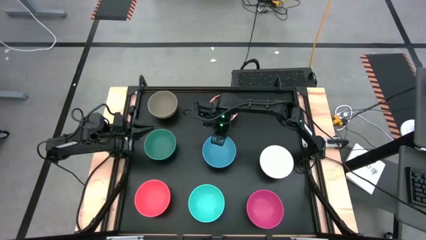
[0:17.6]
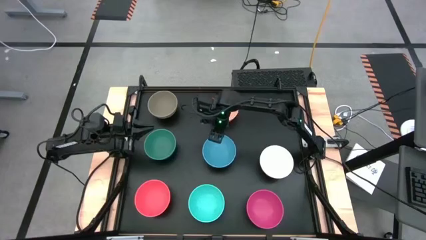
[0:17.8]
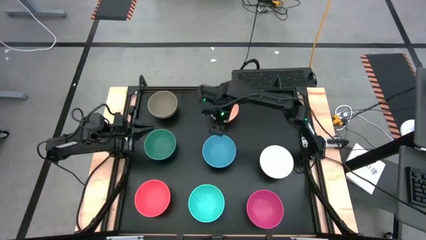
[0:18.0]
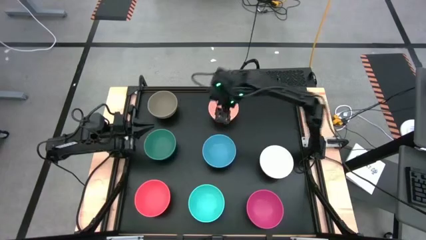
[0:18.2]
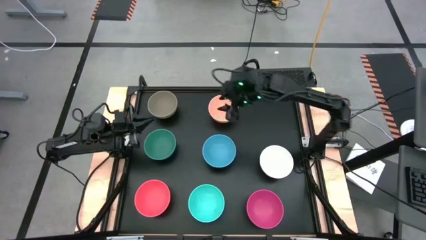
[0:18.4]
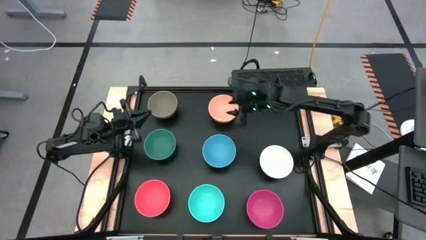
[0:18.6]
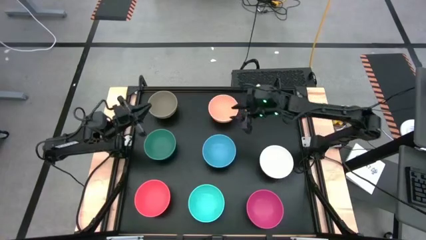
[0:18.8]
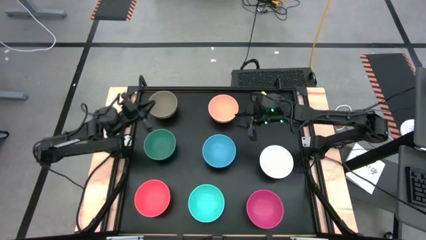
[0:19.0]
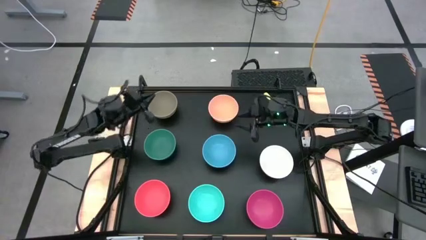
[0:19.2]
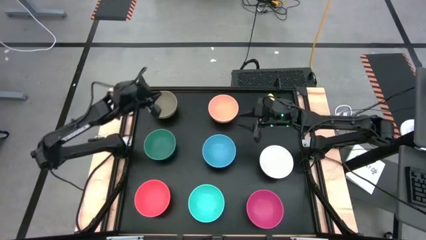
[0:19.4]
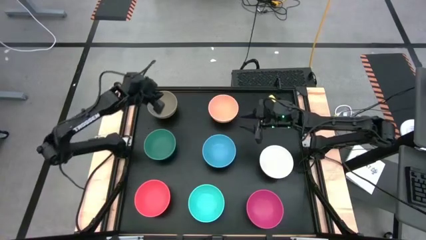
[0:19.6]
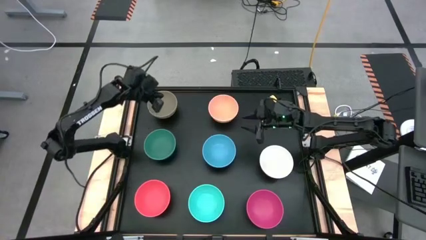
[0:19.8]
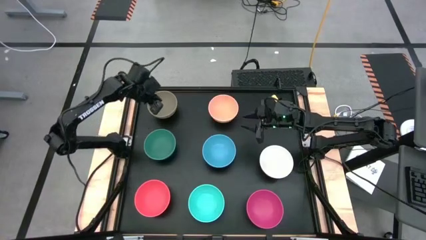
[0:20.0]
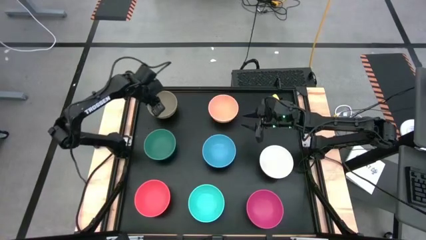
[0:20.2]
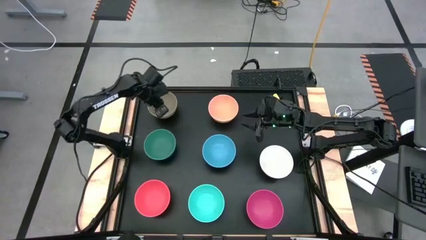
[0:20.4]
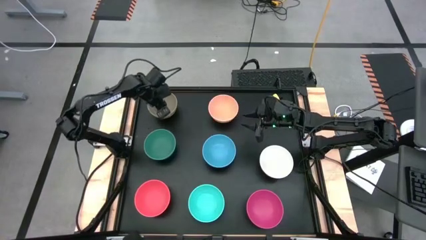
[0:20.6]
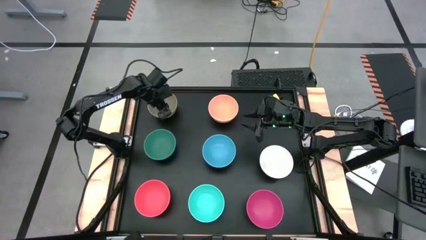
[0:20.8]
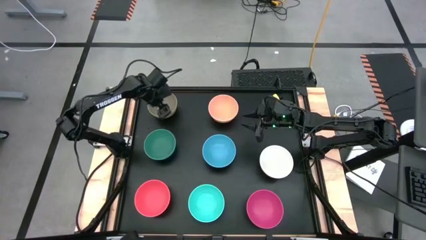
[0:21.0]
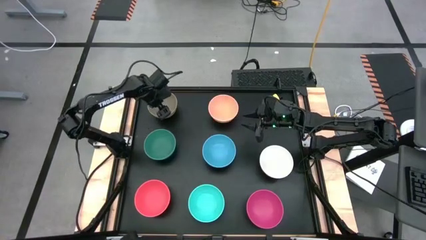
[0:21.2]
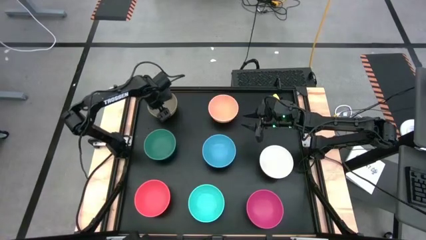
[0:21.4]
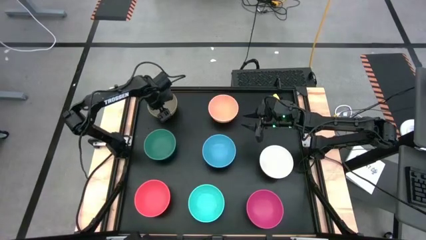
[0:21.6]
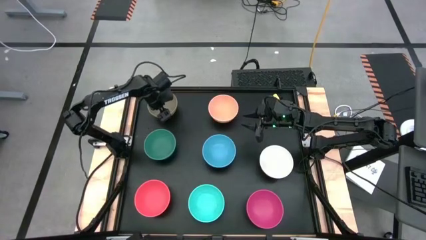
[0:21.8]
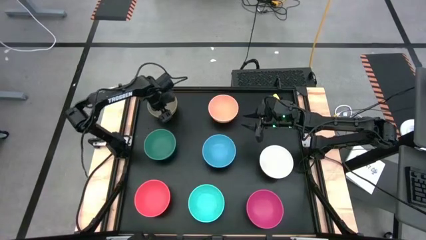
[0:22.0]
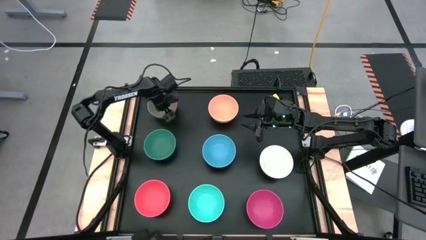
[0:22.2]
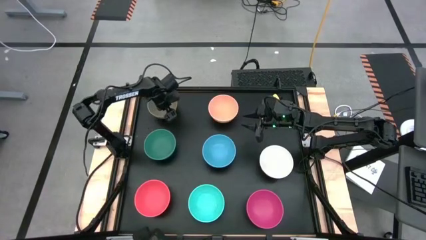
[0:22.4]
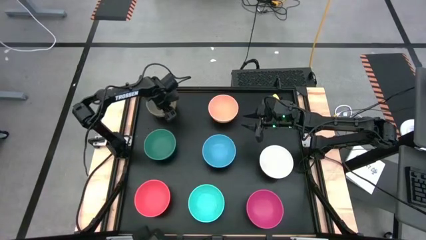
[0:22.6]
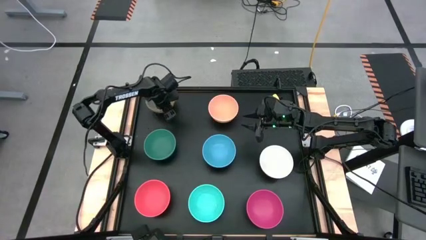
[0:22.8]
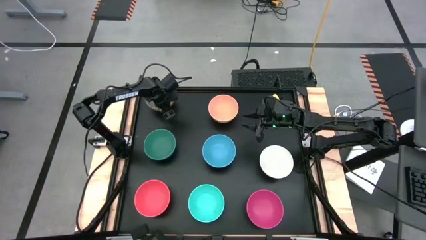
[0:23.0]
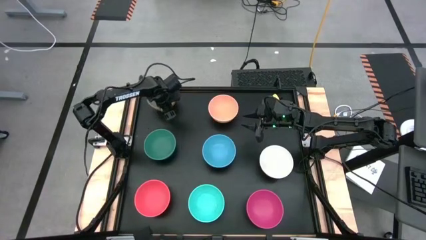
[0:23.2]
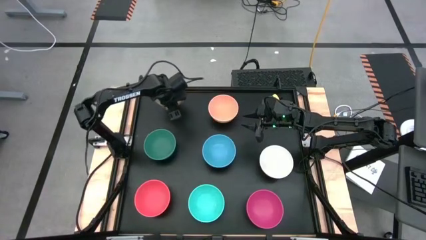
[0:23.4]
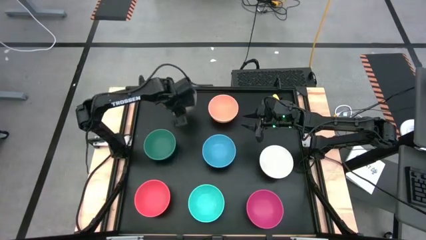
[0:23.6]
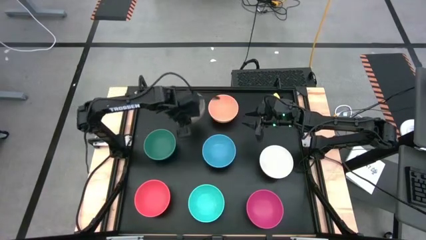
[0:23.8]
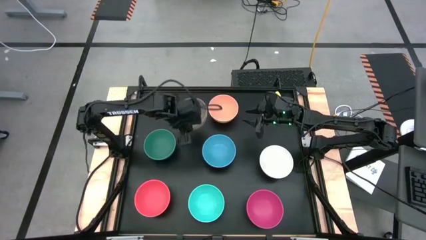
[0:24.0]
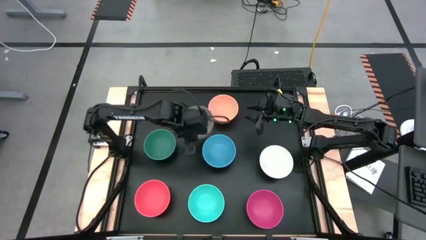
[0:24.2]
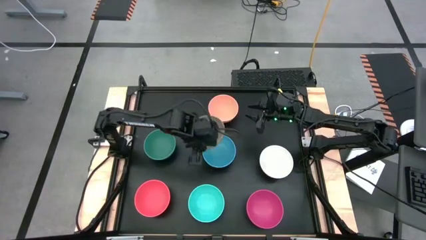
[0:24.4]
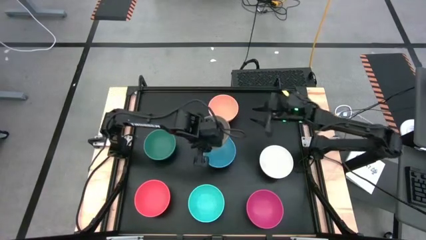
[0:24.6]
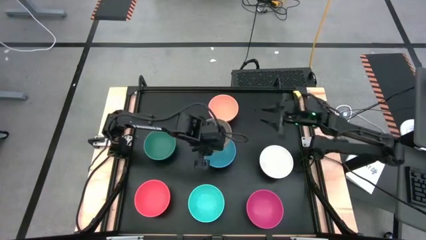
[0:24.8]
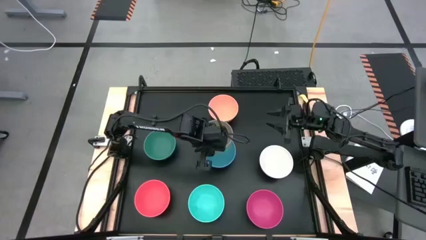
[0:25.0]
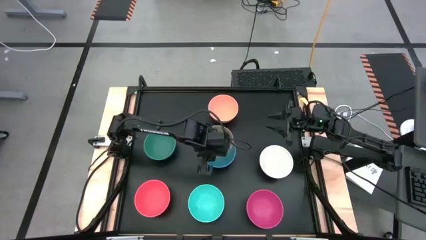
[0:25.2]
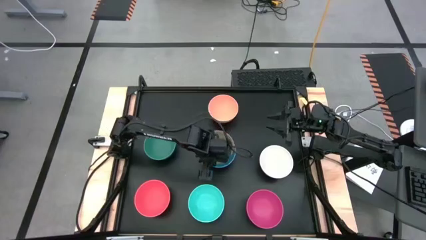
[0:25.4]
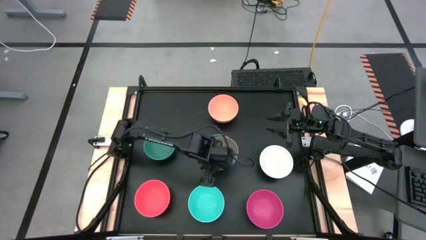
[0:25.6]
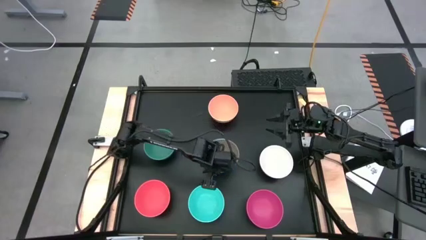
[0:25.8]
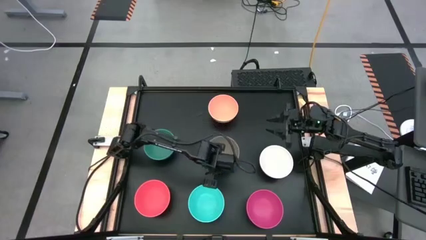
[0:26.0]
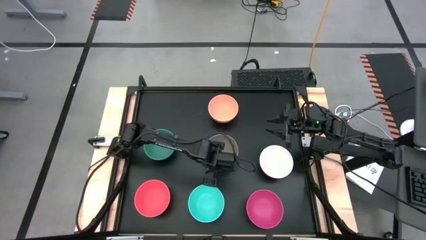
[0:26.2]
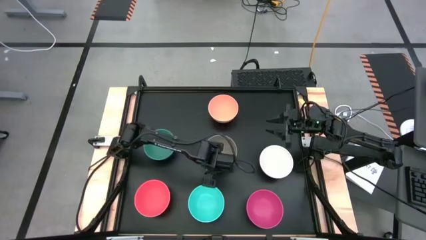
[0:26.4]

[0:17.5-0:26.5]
Task: Nest bowls inside each other
Stack the gray bowl on the blue bowl

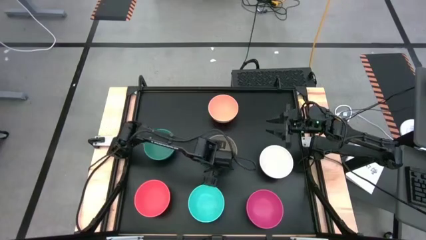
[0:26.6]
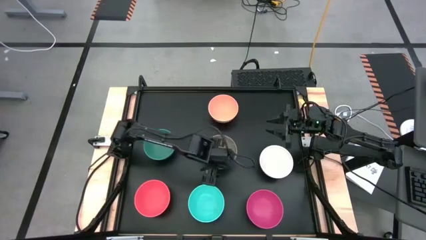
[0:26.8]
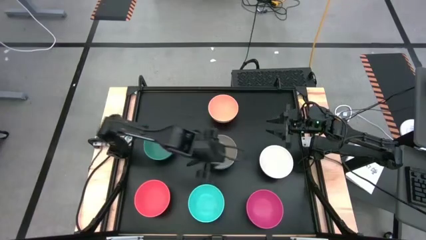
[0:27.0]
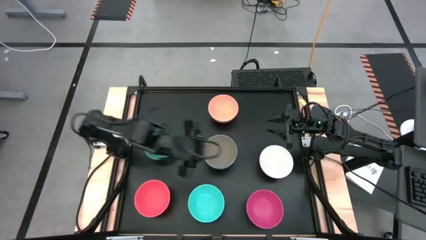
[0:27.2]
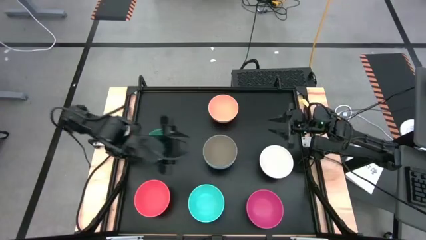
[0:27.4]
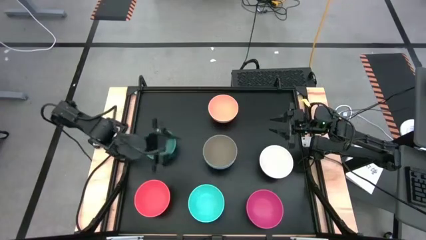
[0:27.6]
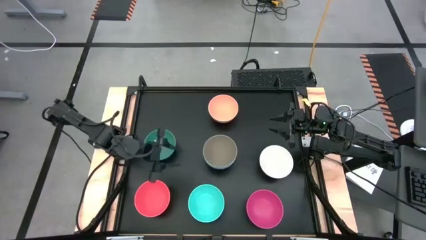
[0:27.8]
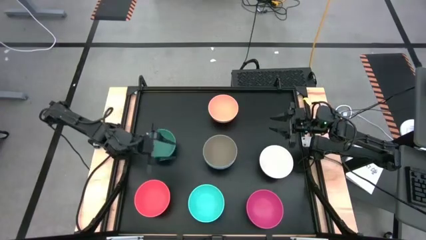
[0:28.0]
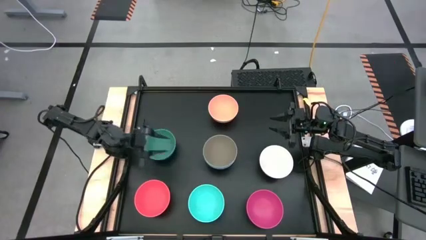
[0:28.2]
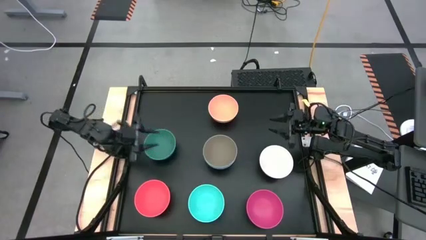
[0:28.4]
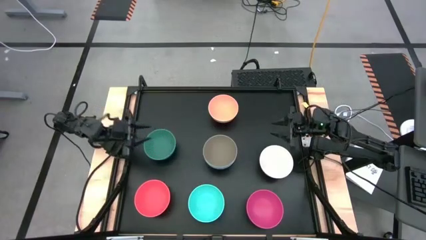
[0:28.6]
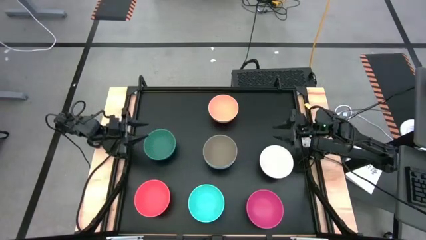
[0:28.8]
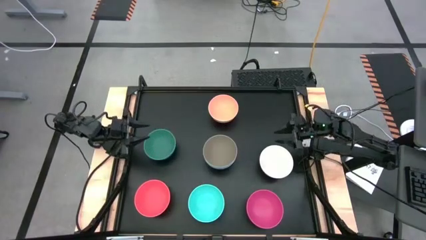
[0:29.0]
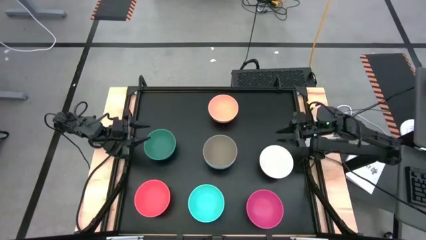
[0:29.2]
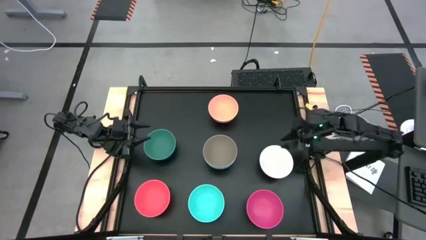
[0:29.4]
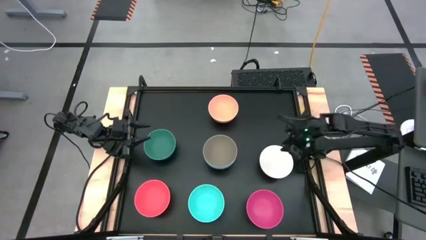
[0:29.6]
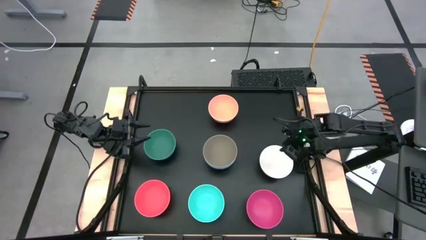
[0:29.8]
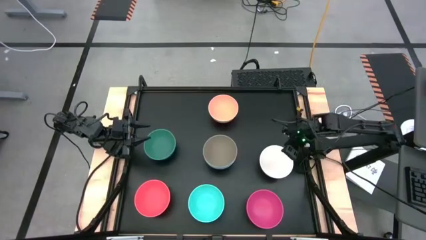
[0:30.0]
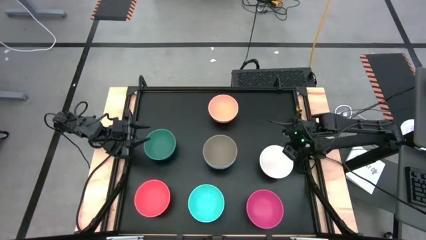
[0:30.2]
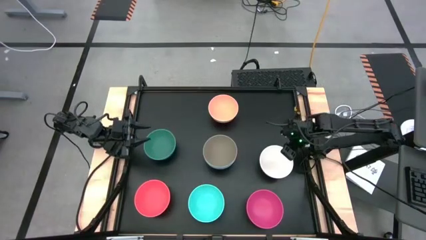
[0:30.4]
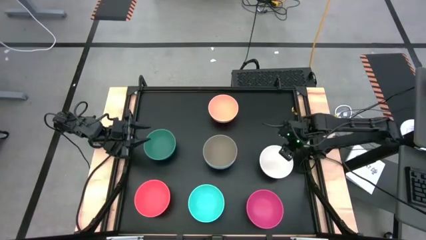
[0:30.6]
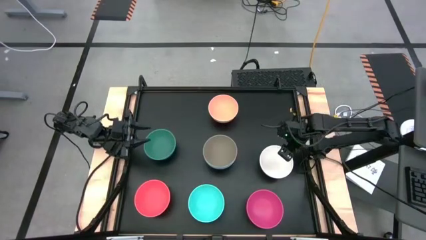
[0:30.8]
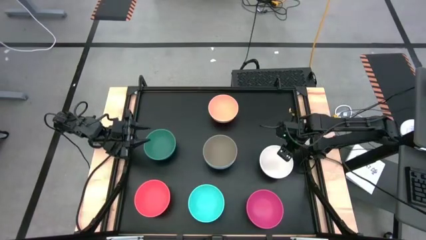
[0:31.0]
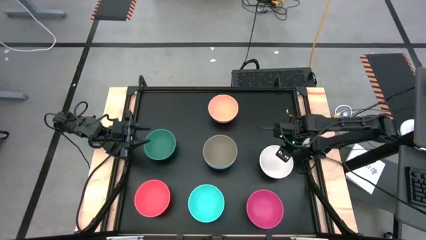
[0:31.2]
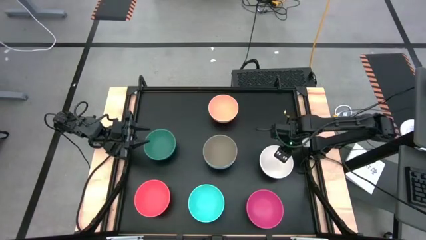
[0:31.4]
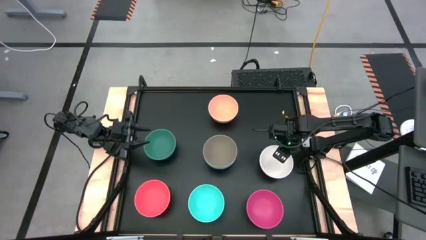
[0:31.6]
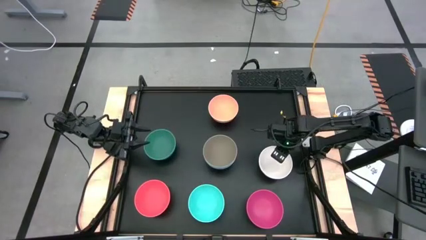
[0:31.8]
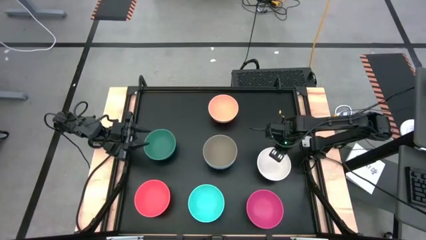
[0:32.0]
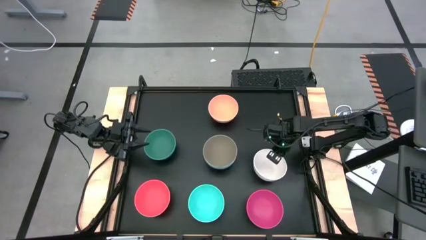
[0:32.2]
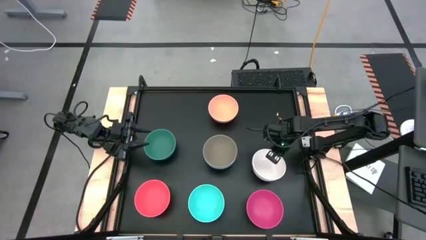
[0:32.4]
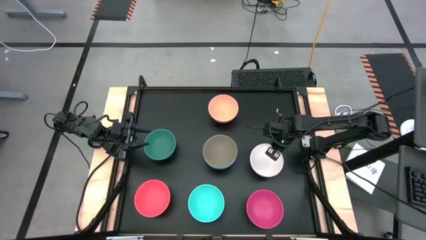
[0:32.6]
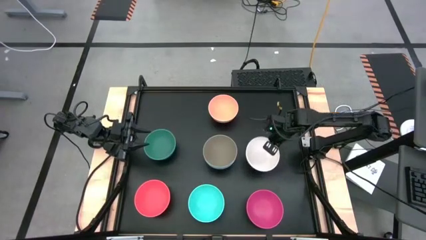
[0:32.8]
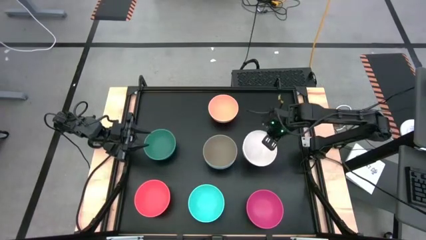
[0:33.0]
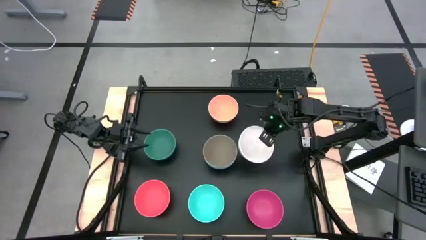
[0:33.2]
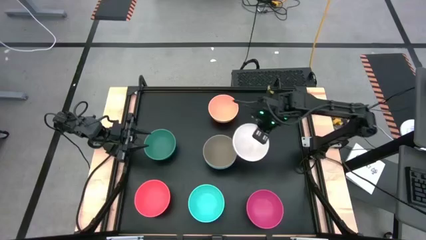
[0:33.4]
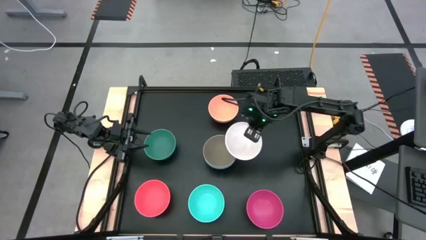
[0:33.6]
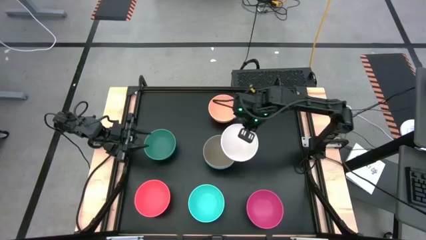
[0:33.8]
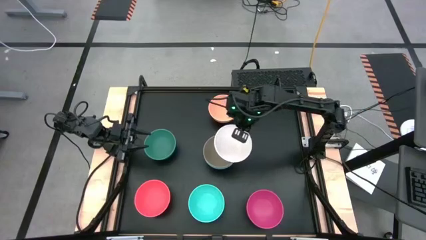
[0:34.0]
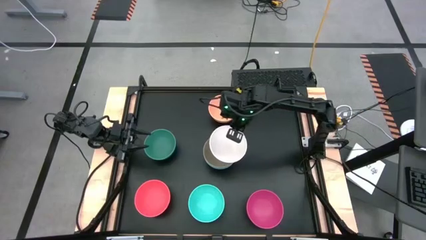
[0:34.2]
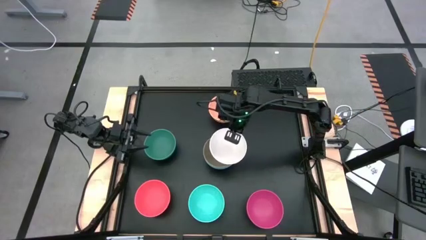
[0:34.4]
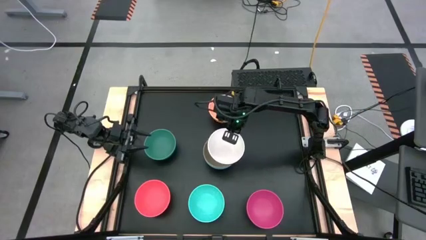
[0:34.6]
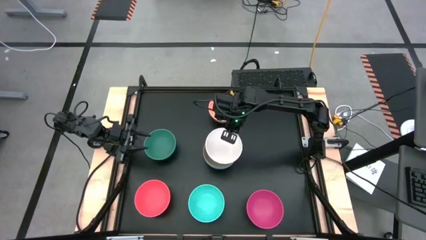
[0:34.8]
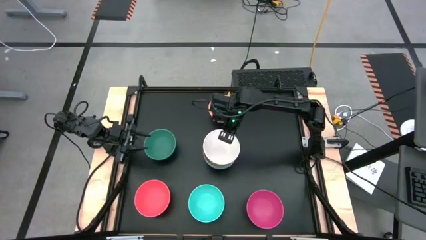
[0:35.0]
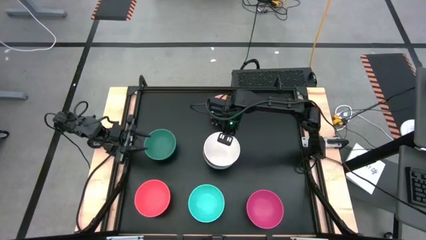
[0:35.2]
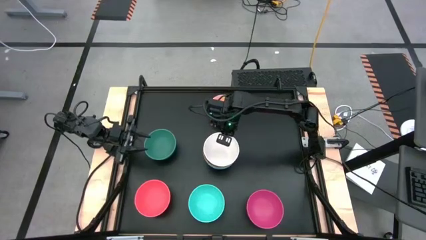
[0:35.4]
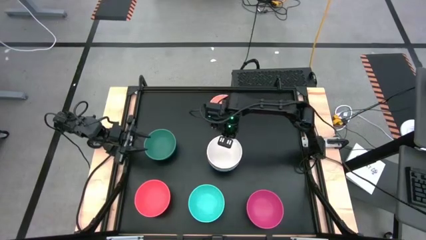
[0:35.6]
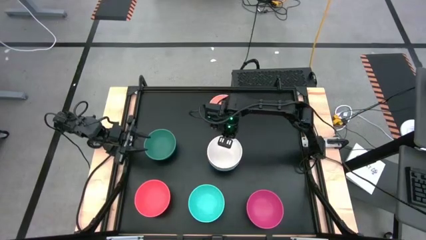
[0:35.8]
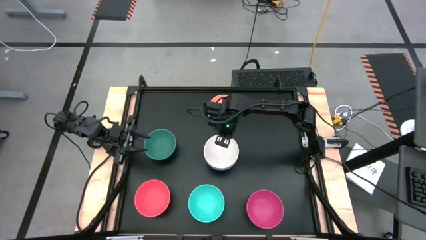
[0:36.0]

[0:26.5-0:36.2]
Stack the white bowl on the gray bowl
